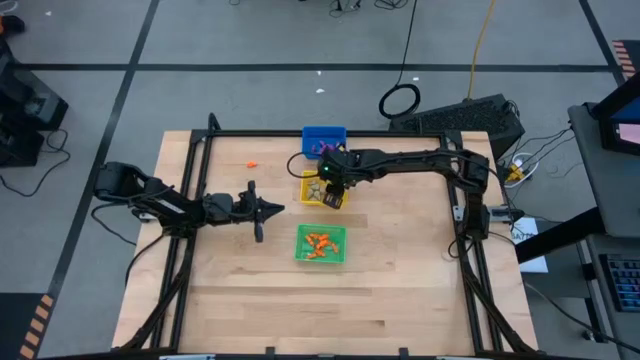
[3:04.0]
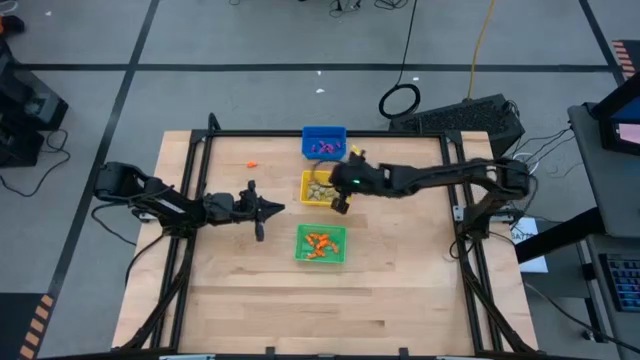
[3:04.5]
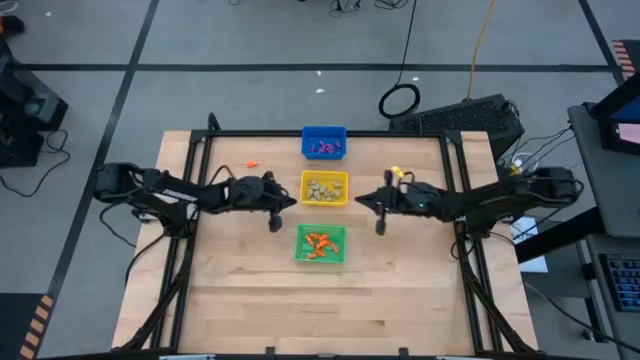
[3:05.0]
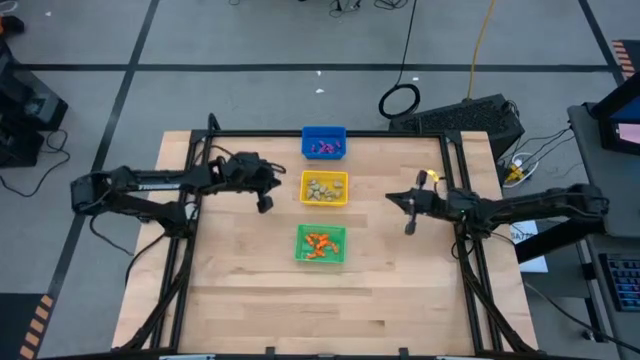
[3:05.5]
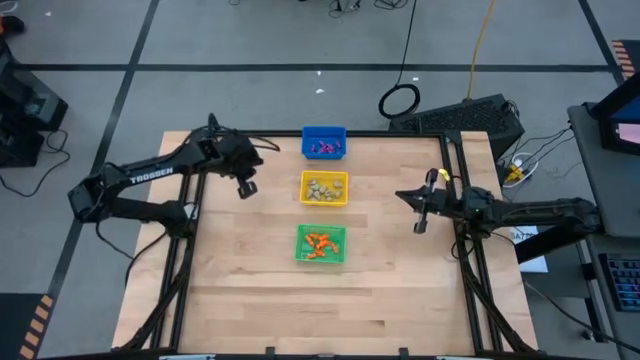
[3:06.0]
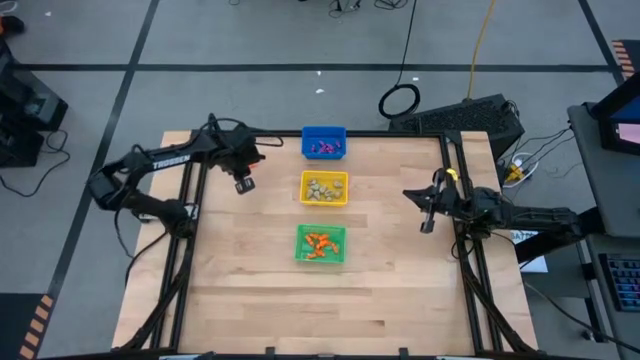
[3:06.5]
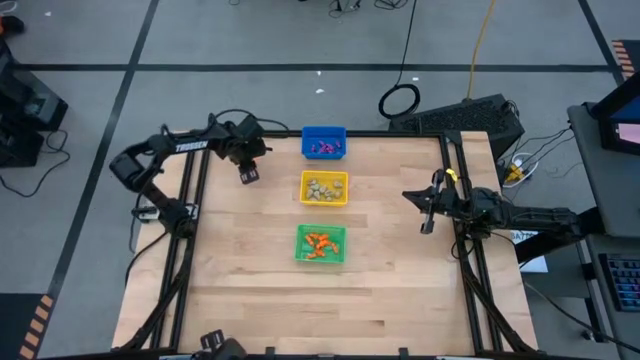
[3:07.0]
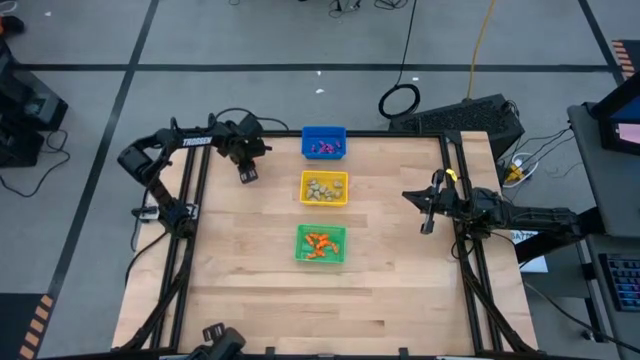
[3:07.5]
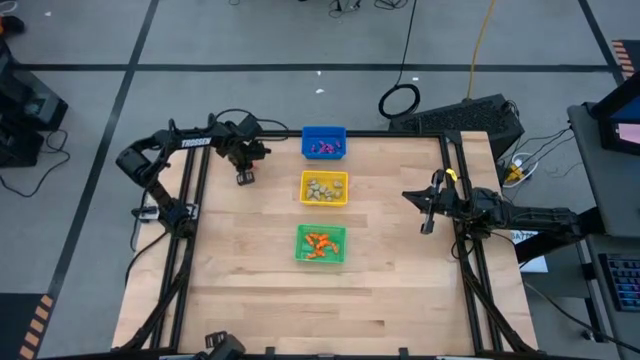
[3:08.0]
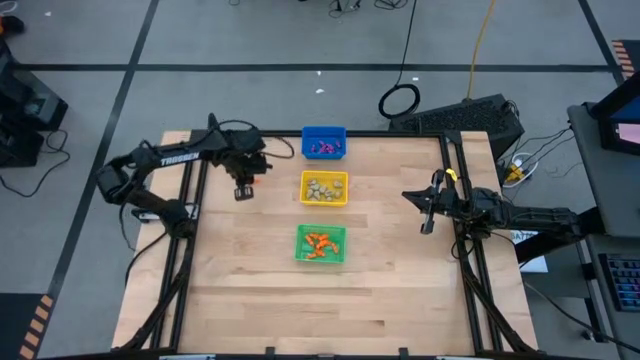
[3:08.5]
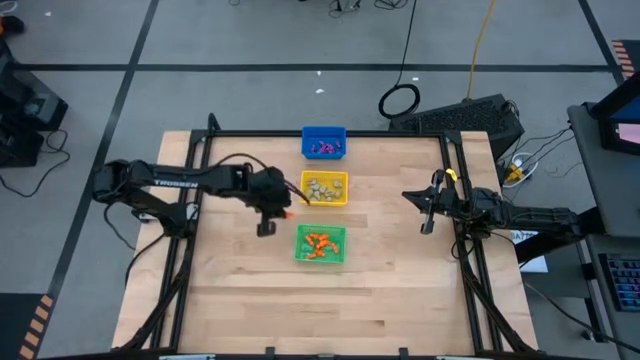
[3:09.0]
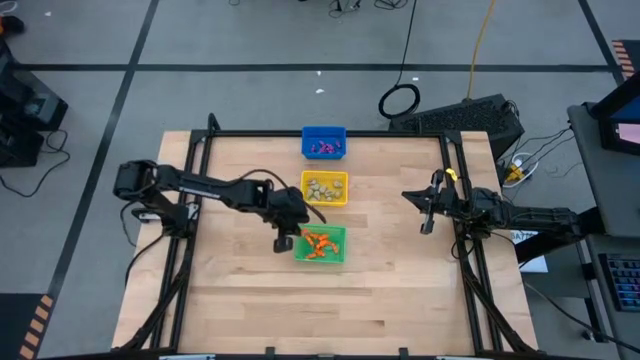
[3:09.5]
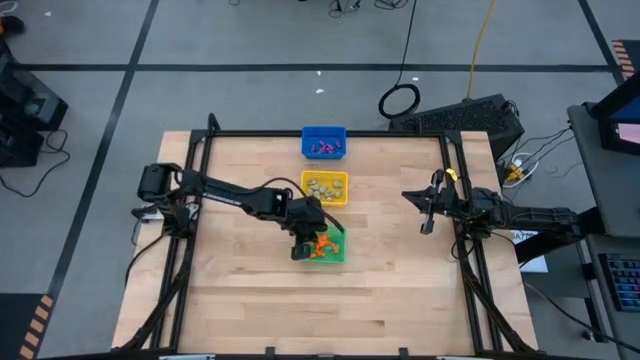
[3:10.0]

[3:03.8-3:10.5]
Task: Sort Halloween decoration
Put the orange skeleton toy into the green bin

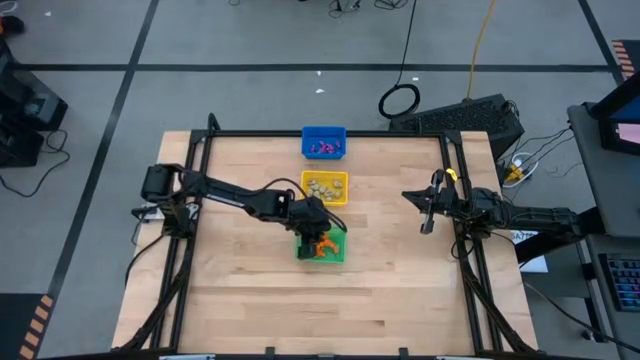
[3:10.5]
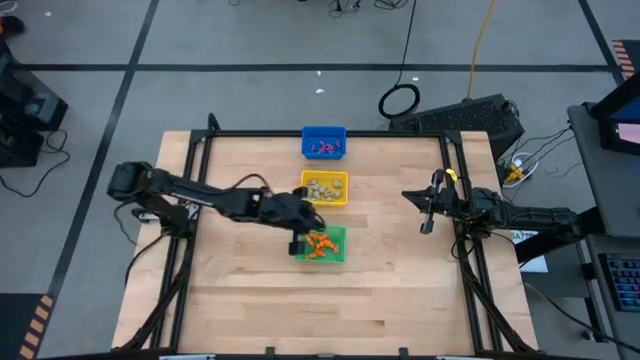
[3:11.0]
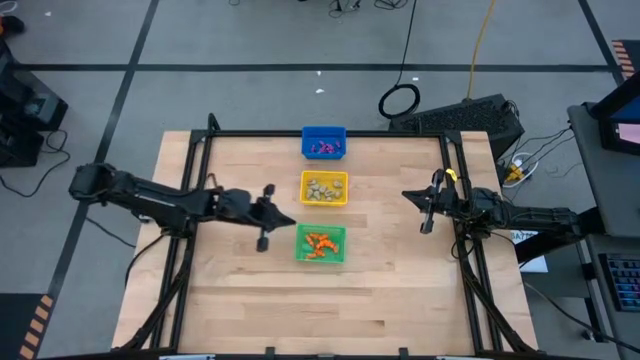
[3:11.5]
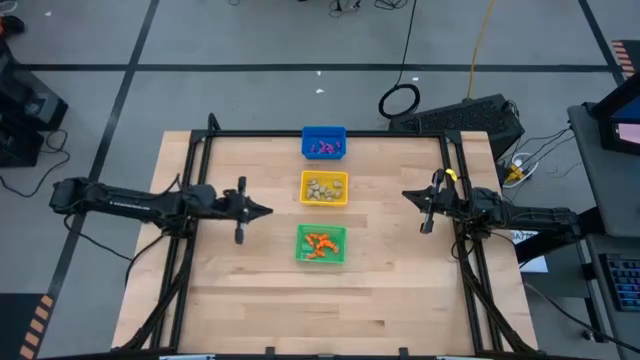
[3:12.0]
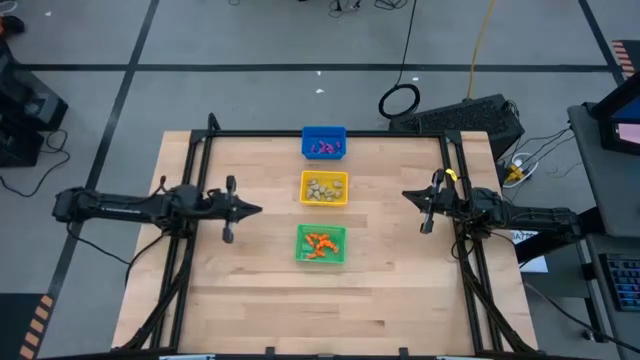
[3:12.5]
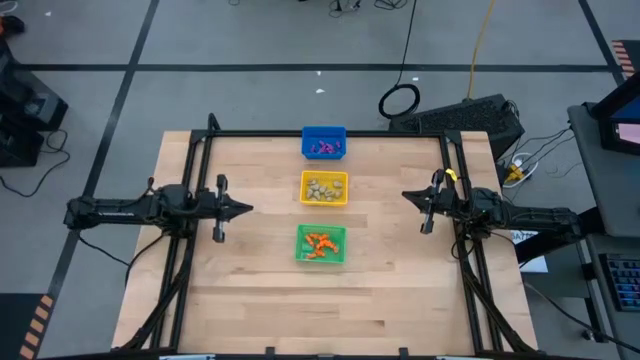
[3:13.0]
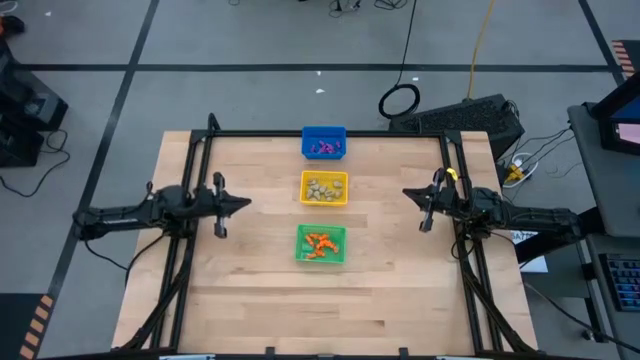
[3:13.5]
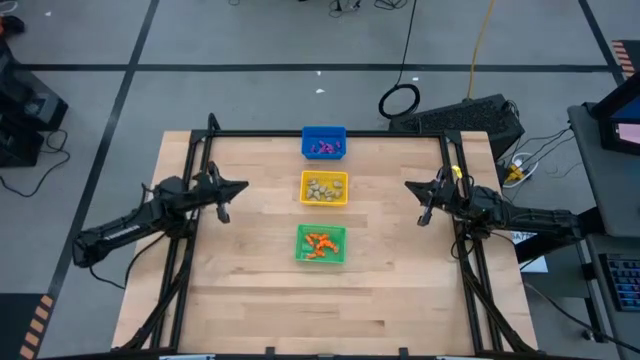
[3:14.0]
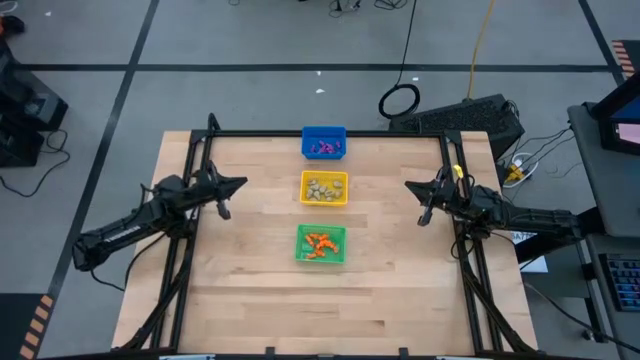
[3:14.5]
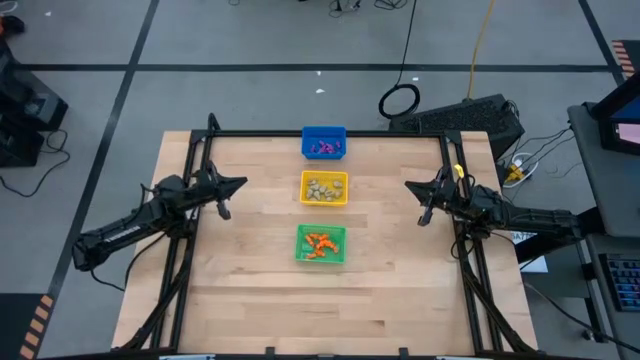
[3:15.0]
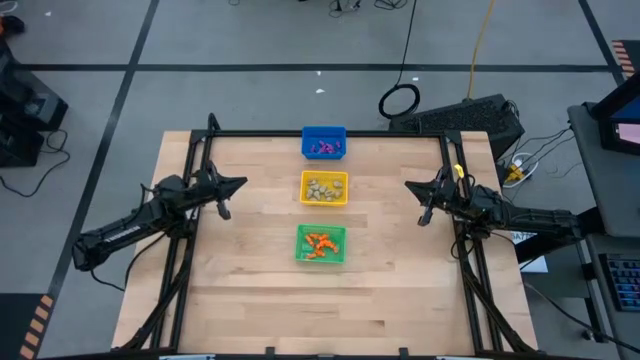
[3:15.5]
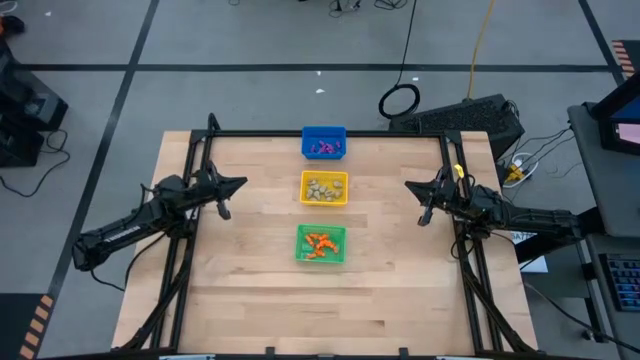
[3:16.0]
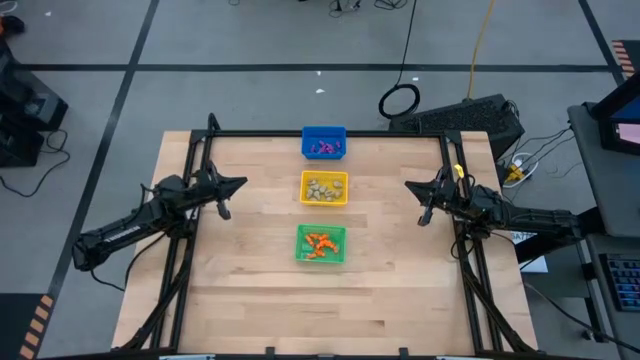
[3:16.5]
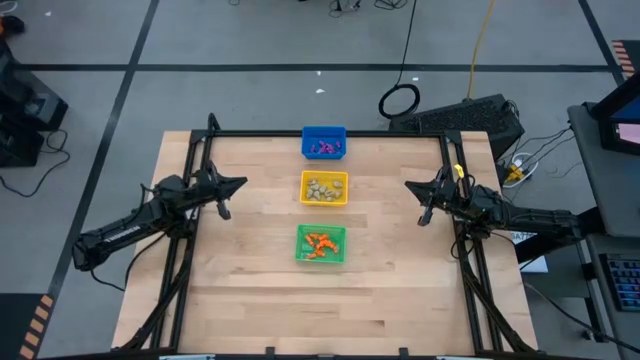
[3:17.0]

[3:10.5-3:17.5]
Return to Home Position

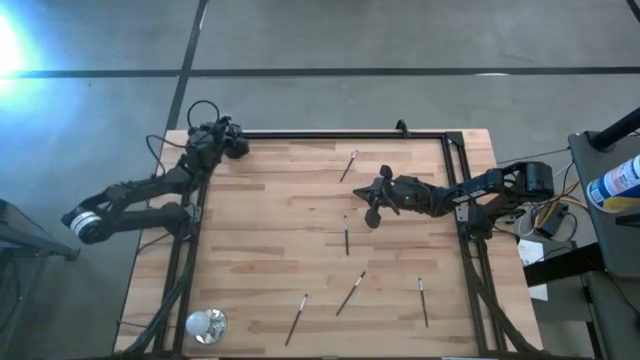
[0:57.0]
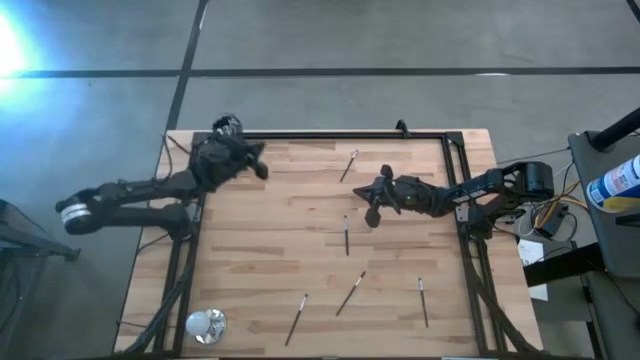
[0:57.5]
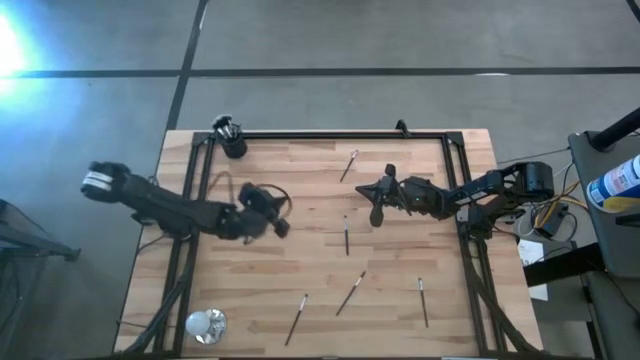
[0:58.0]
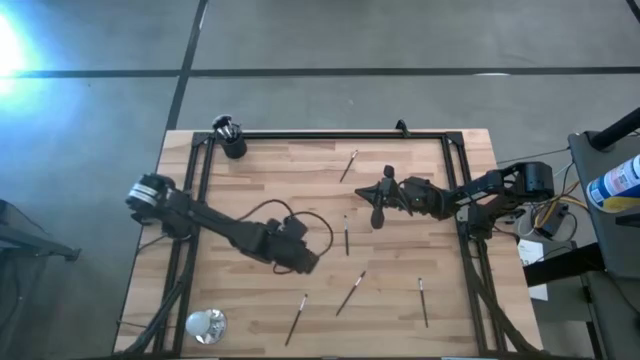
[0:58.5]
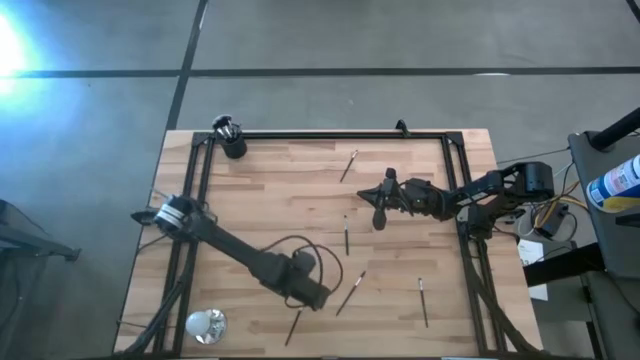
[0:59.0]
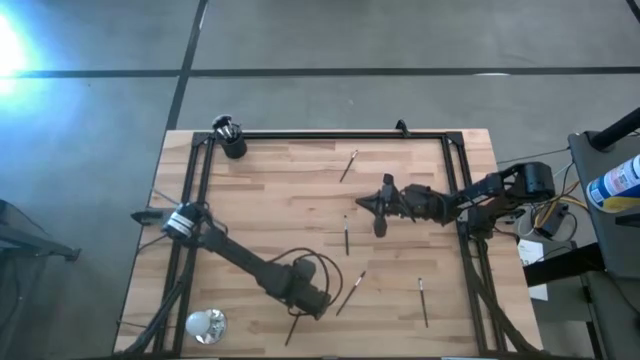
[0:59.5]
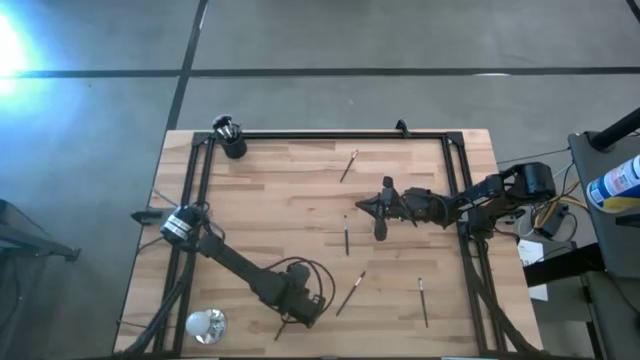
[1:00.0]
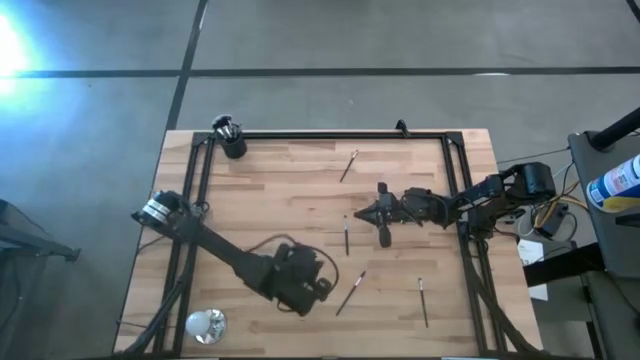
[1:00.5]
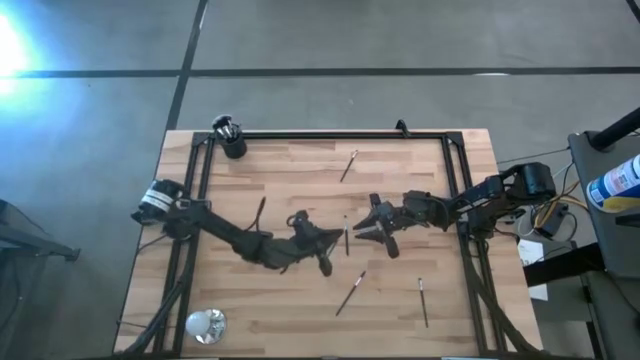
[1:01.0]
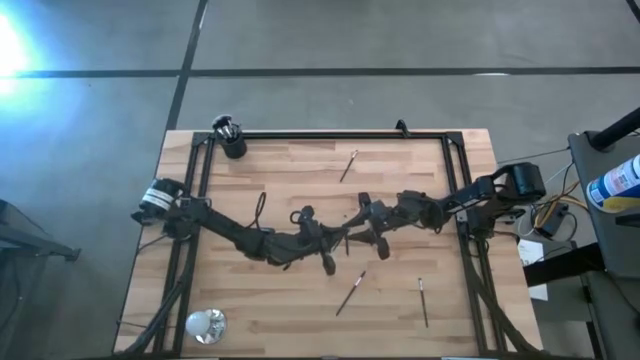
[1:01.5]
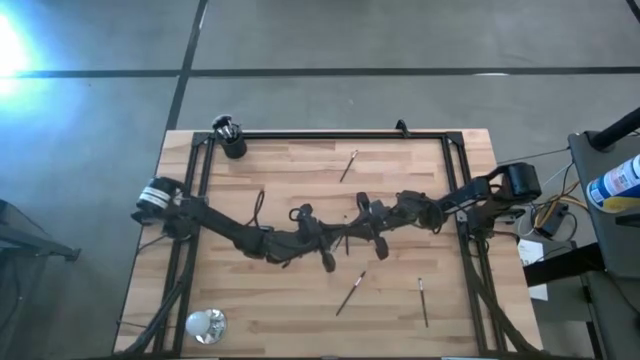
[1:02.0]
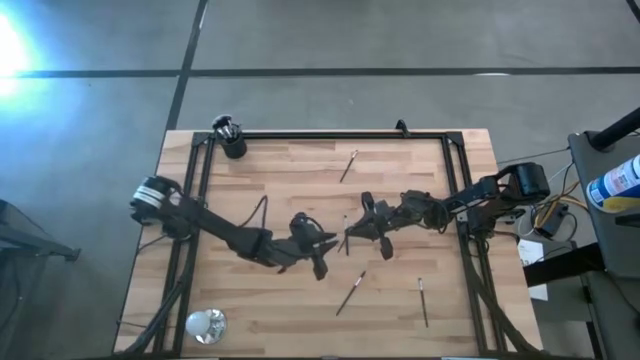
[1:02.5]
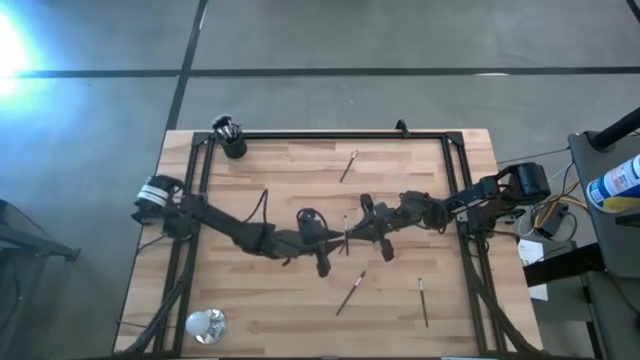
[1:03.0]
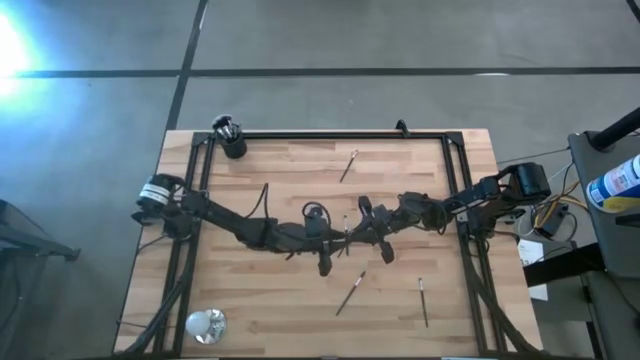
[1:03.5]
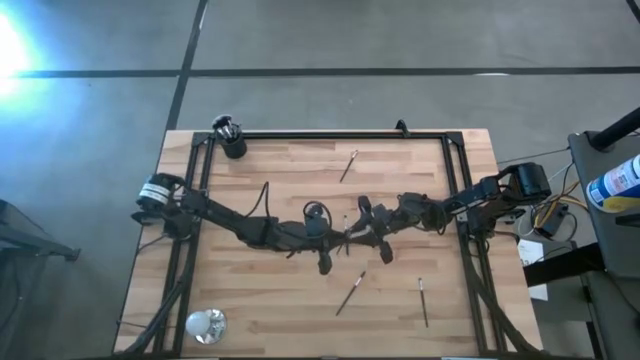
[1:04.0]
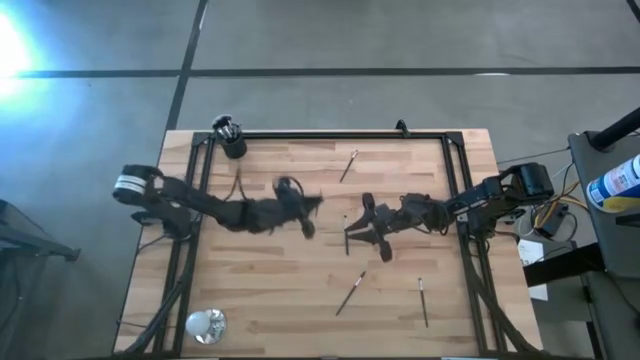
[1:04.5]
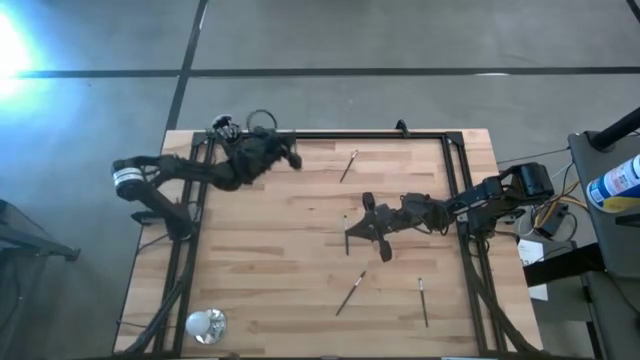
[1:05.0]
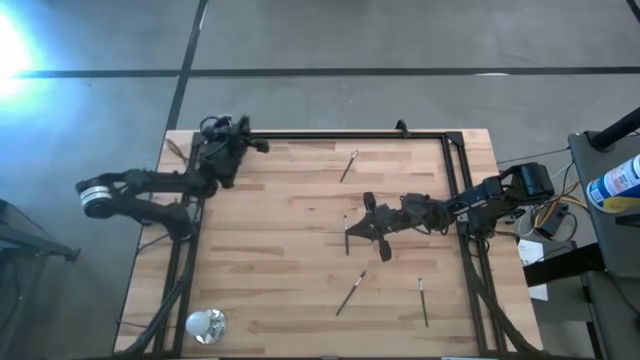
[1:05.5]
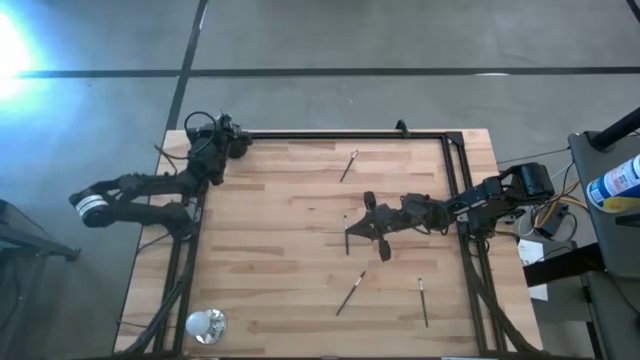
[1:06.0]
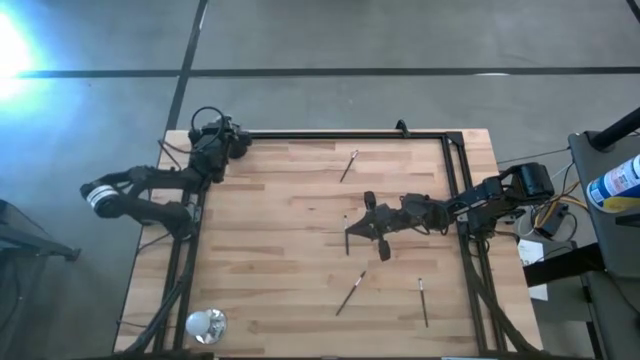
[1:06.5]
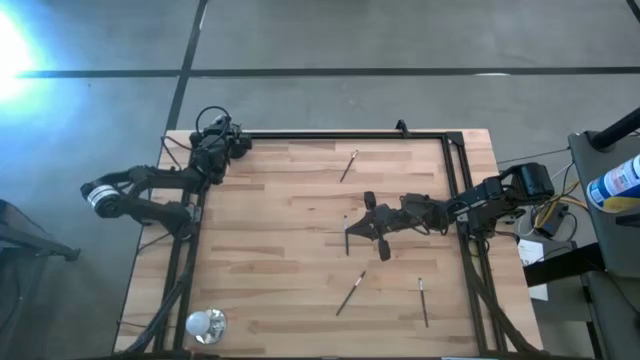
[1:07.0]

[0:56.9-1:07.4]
Task: Put items in baskets/containers
Put the black eyeshadow brush into the black pen holder
